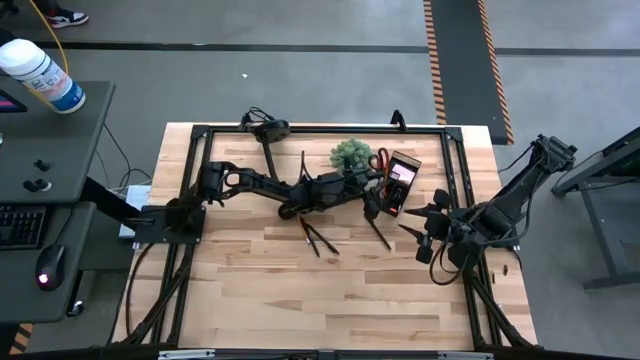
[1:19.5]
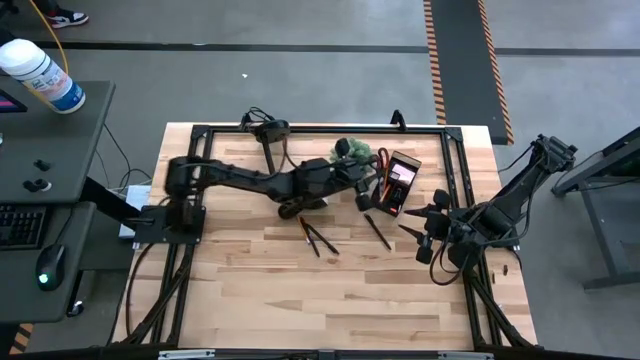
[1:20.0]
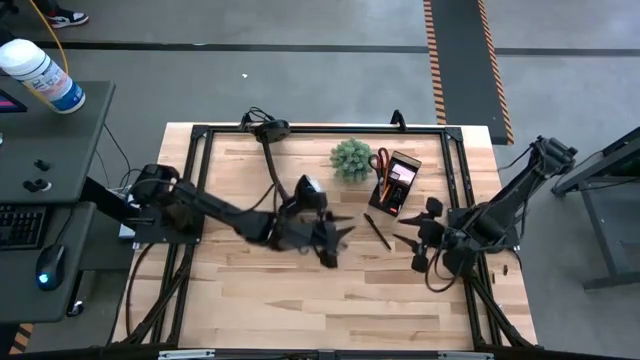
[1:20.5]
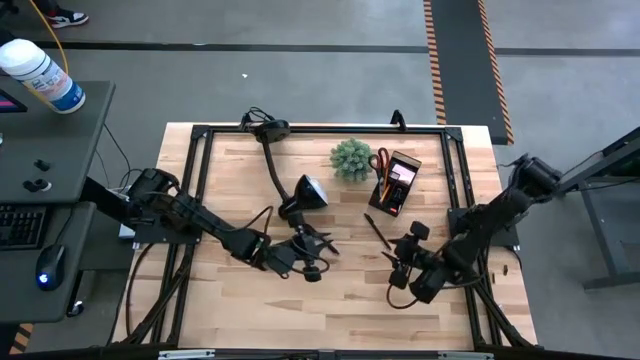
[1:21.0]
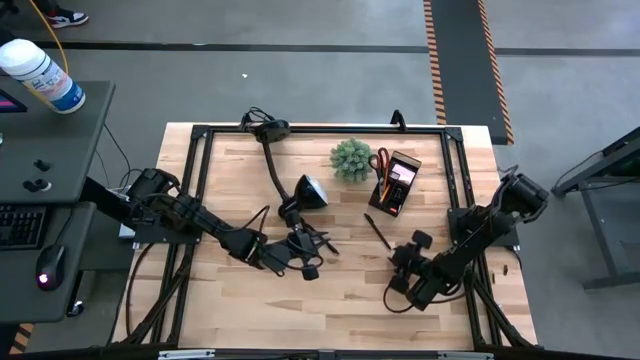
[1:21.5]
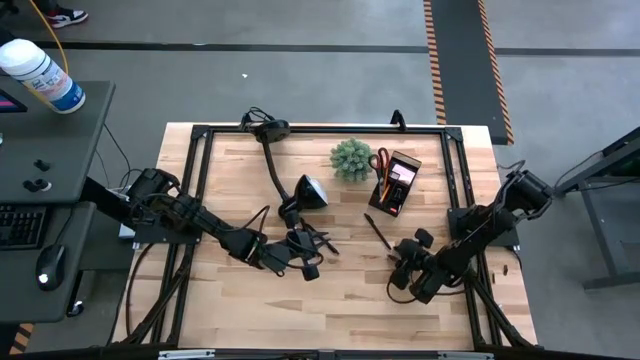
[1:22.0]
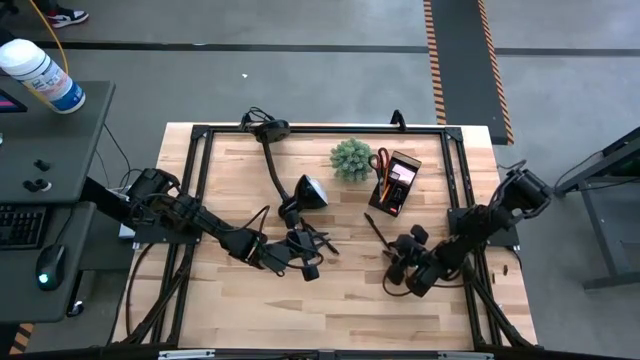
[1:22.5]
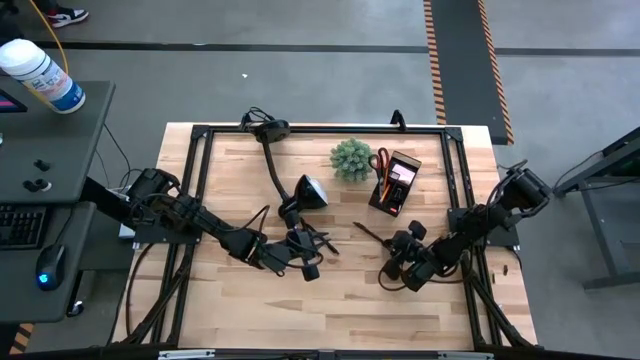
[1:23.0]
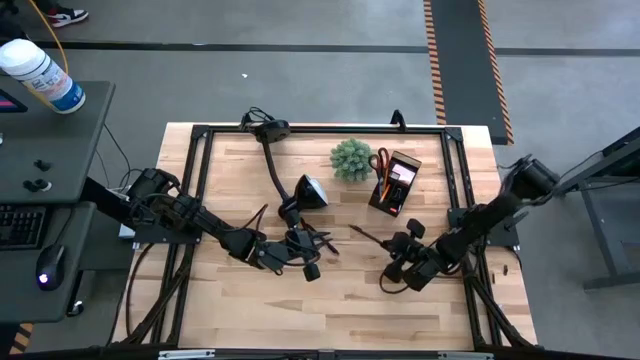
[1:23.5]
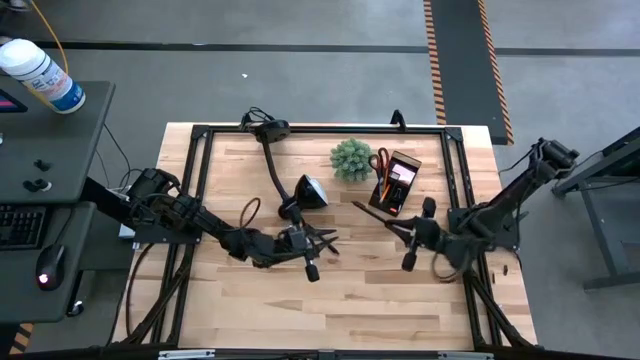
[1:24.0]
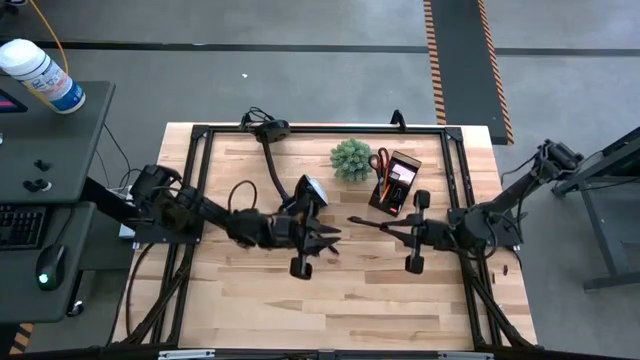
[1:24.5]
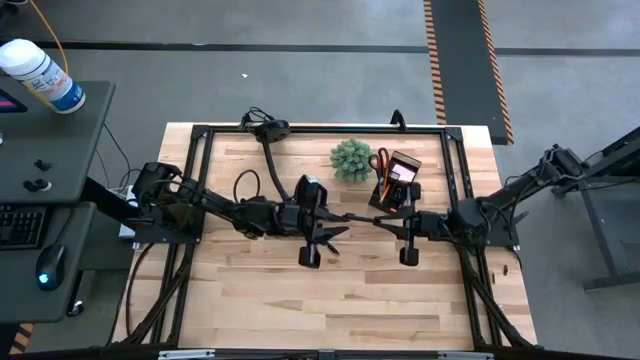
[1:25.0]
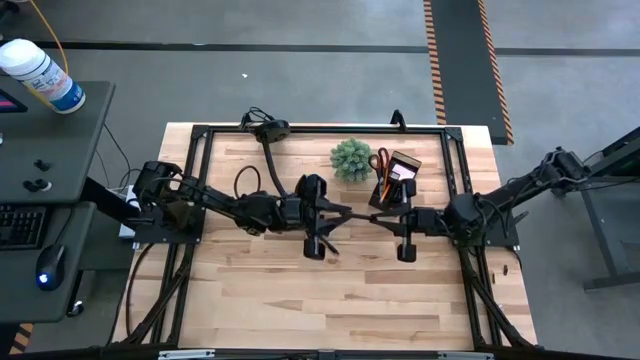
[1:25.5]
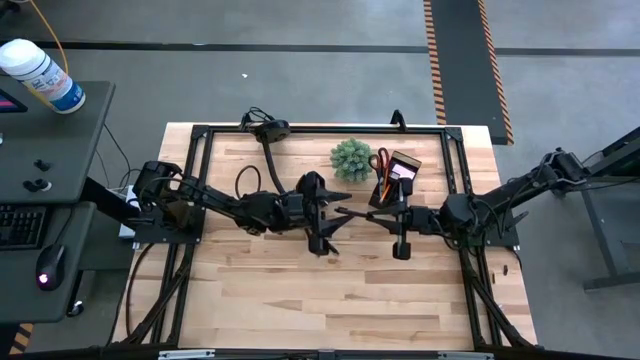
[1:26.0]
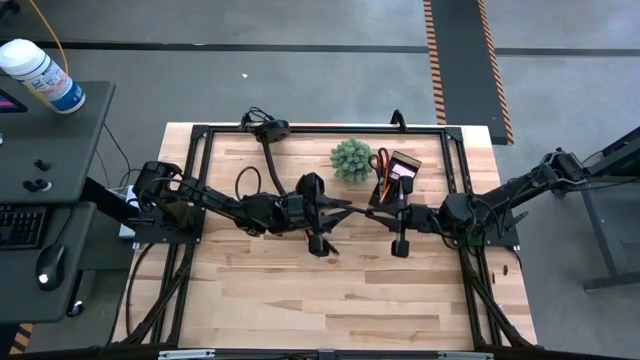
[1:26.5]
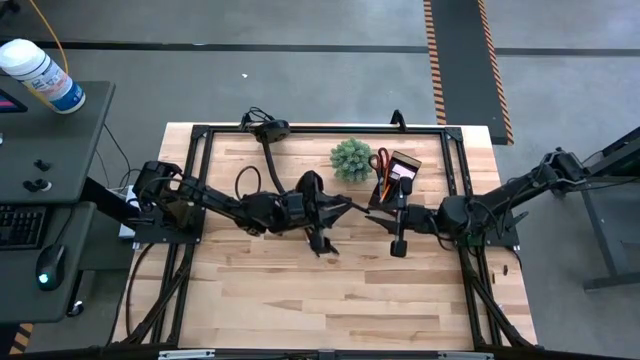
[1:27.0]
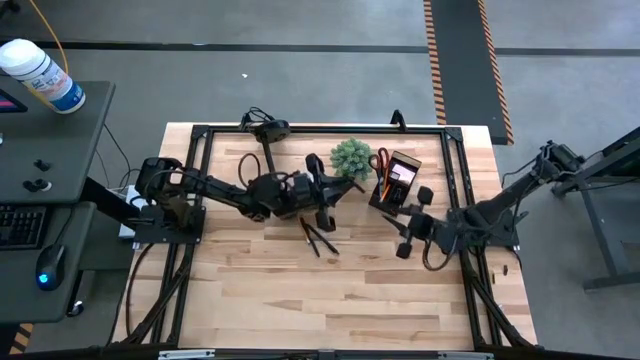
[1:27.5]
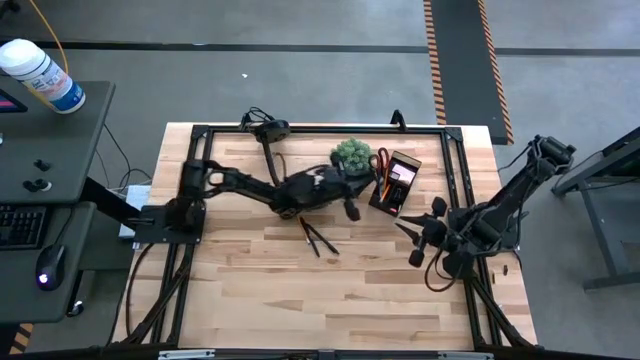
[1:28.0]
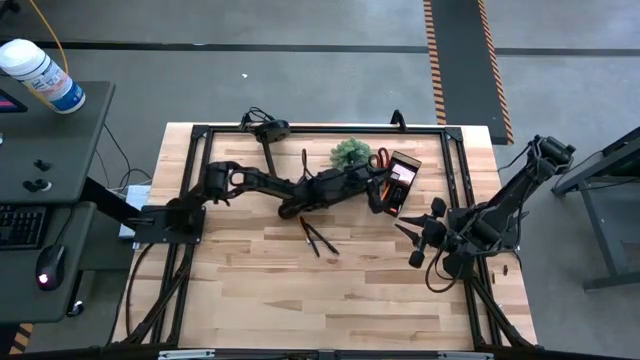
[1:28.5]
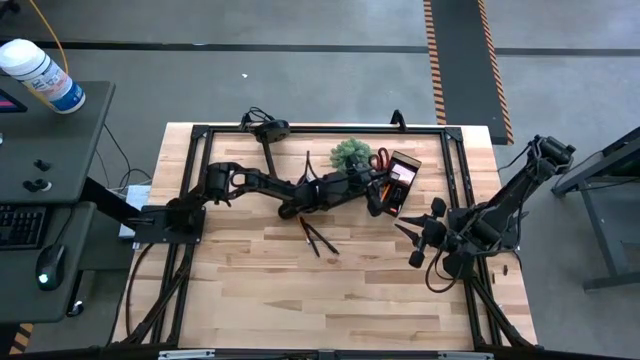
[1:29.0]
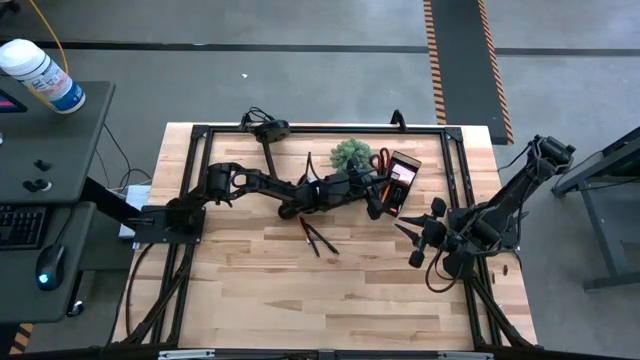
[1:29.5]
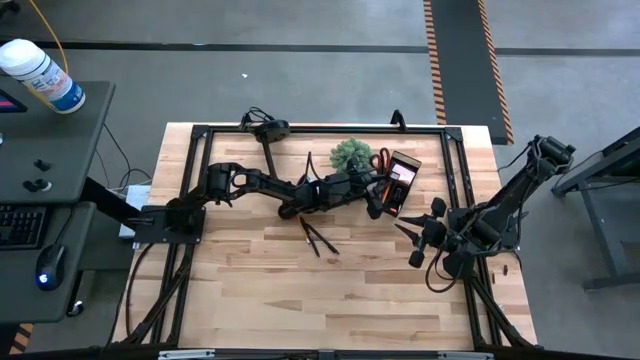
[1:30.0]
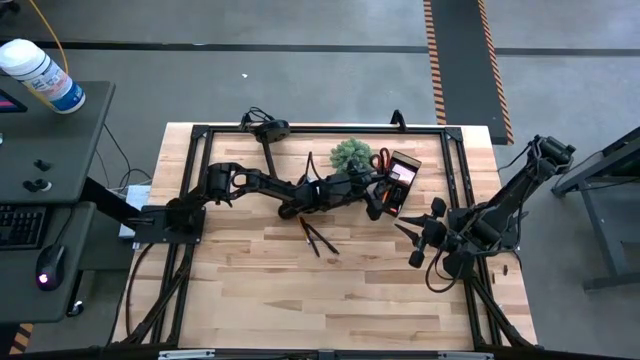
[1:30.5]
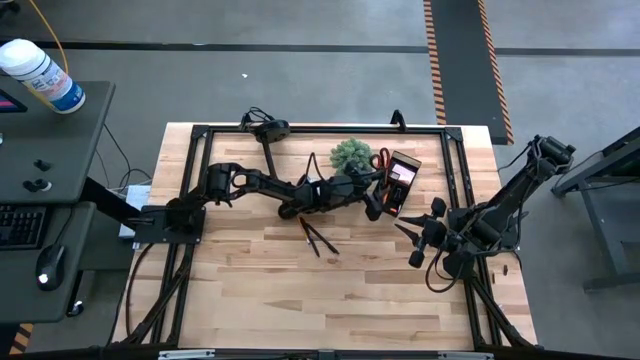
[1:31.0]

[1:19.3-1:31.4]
Task: Pick and place office supplies into organizer
Put the right black pen into the desk organizer

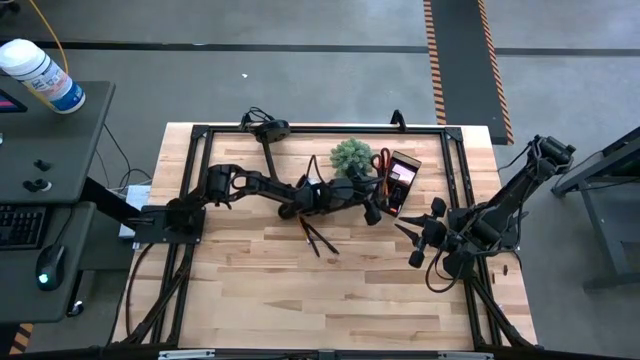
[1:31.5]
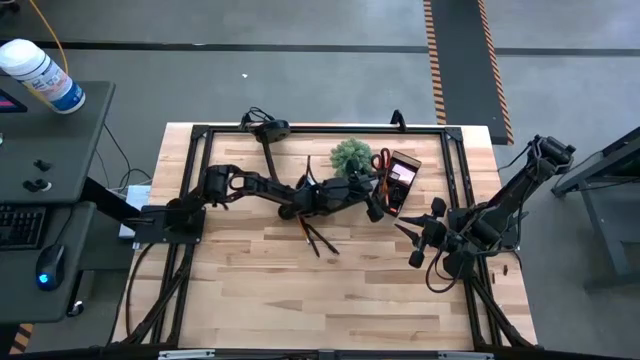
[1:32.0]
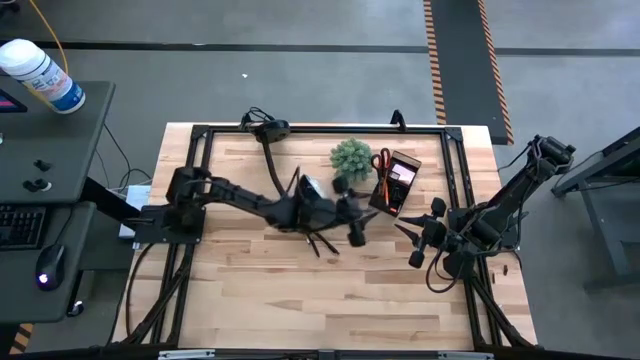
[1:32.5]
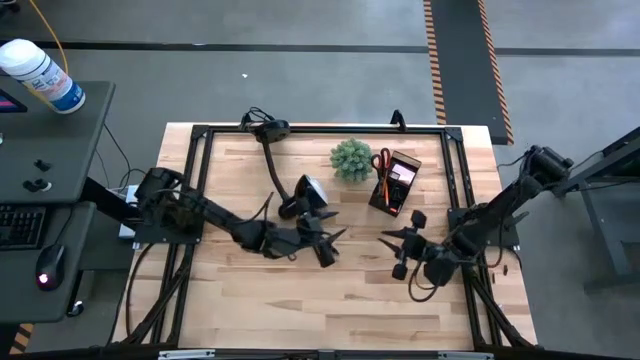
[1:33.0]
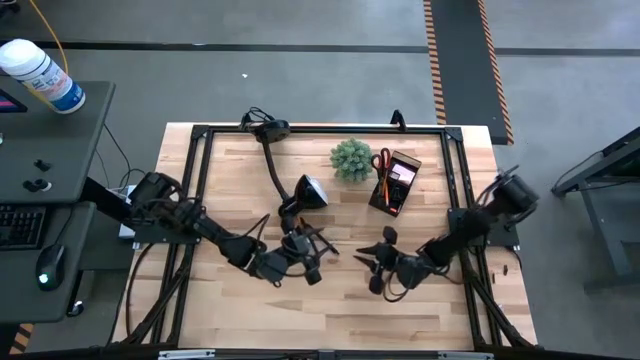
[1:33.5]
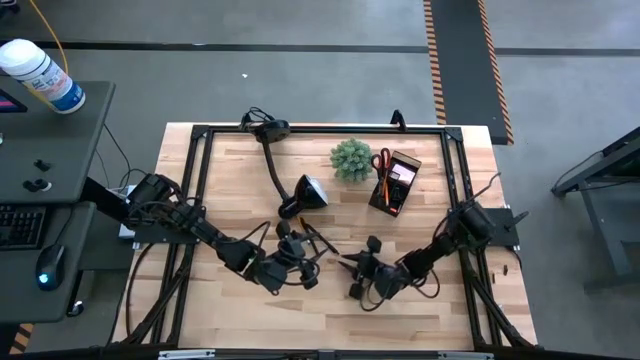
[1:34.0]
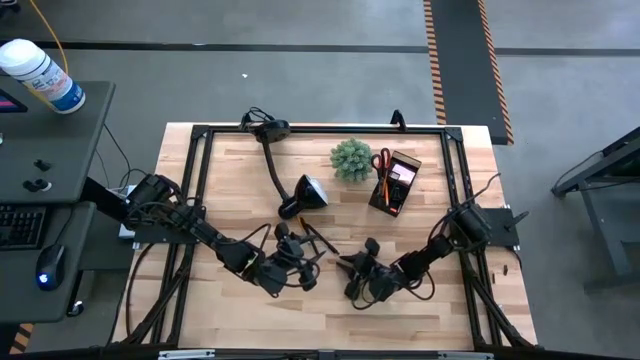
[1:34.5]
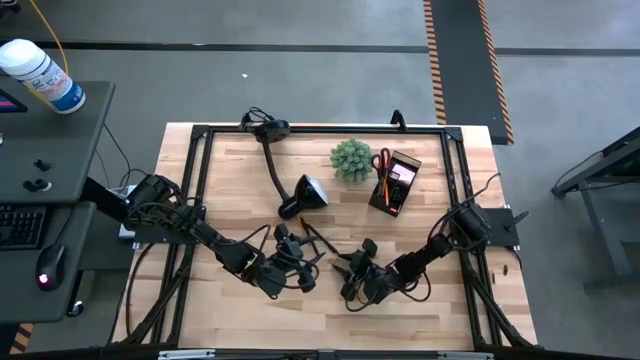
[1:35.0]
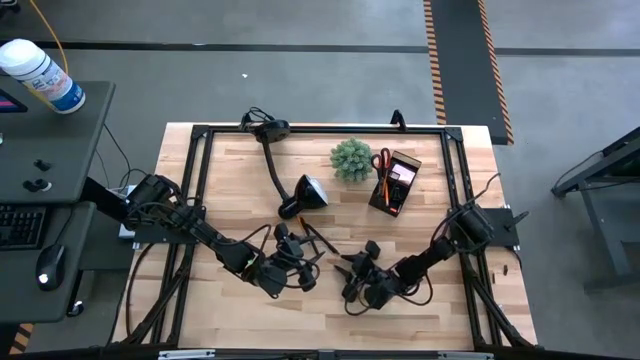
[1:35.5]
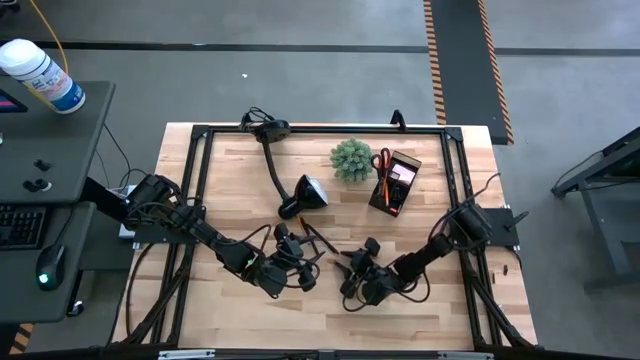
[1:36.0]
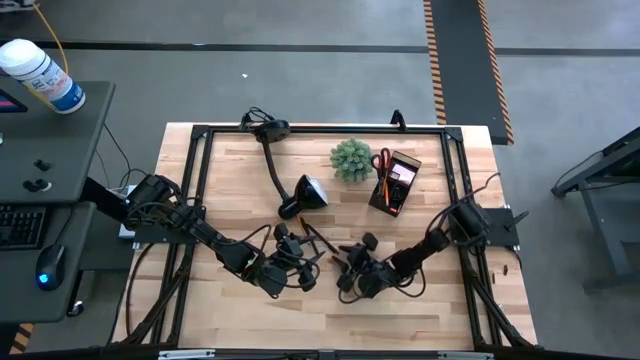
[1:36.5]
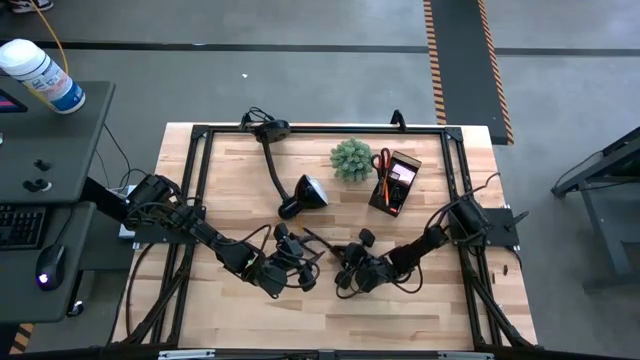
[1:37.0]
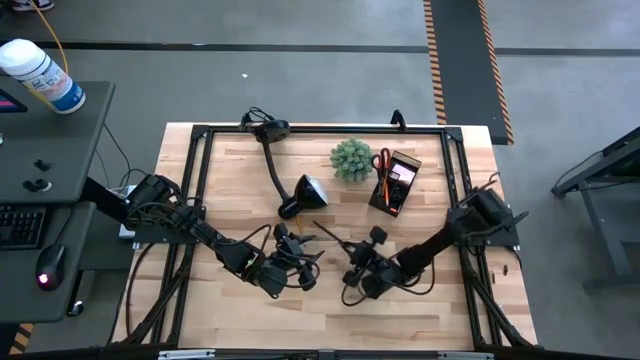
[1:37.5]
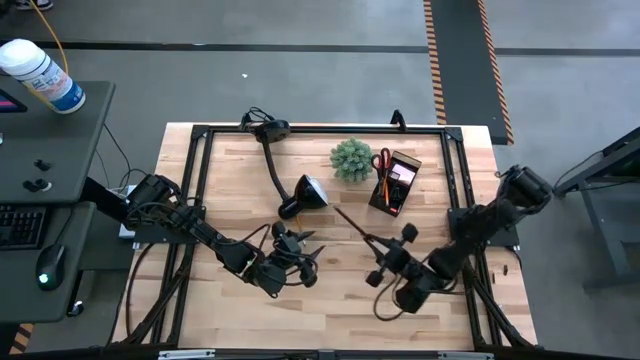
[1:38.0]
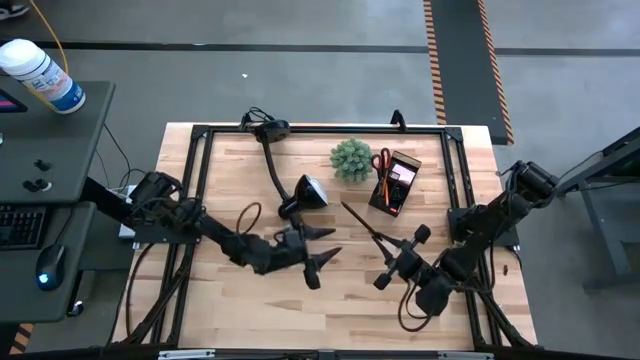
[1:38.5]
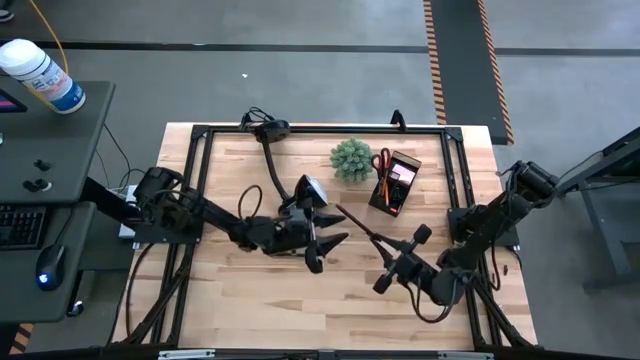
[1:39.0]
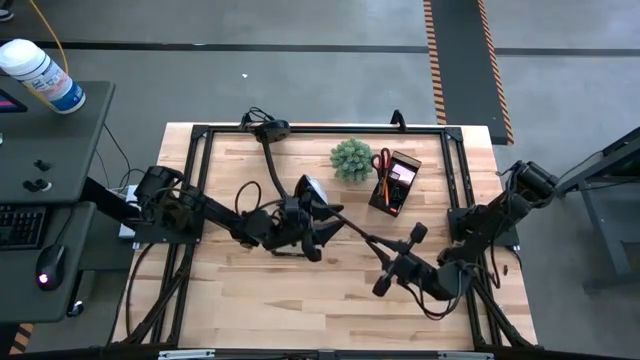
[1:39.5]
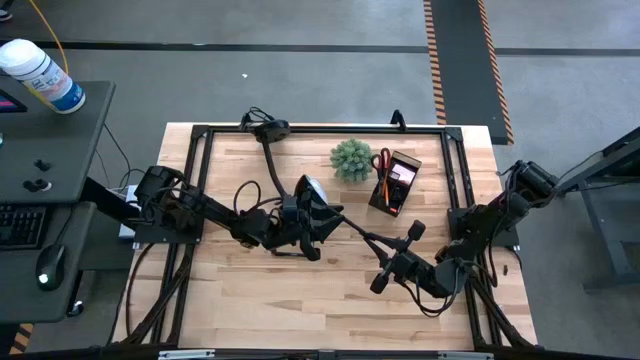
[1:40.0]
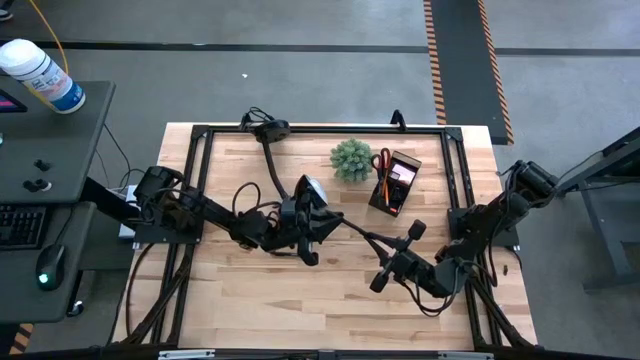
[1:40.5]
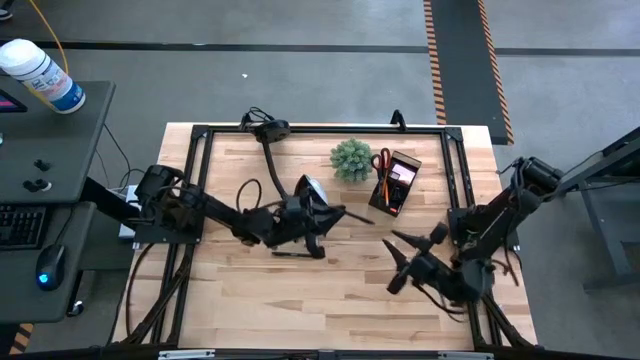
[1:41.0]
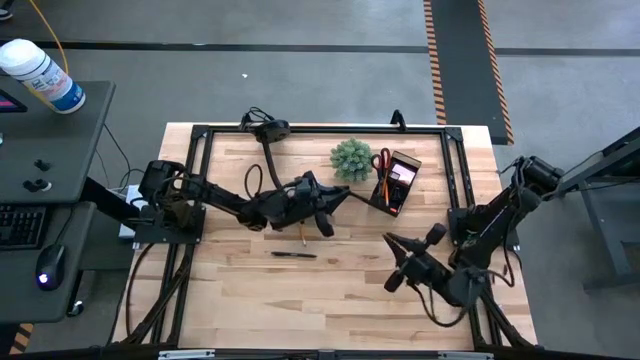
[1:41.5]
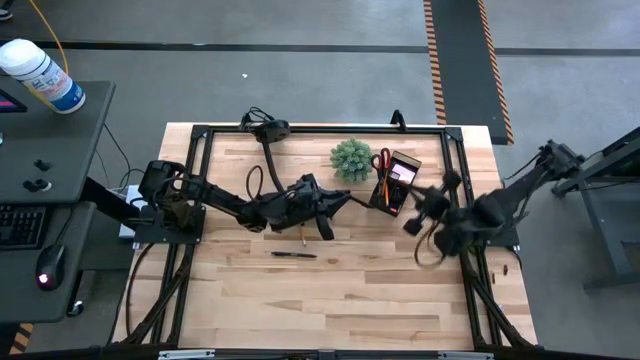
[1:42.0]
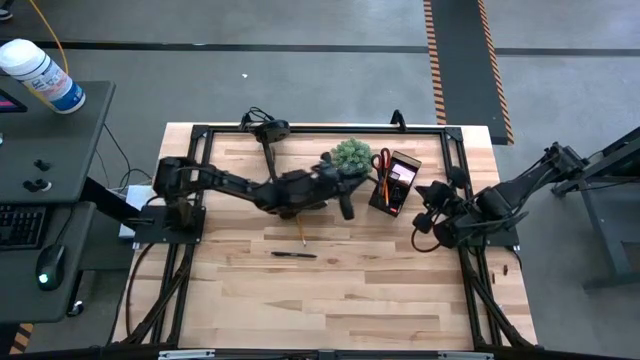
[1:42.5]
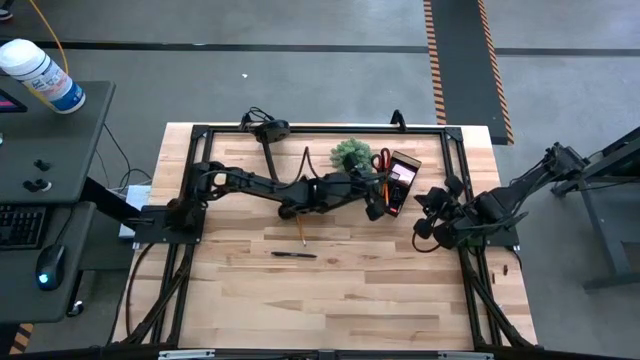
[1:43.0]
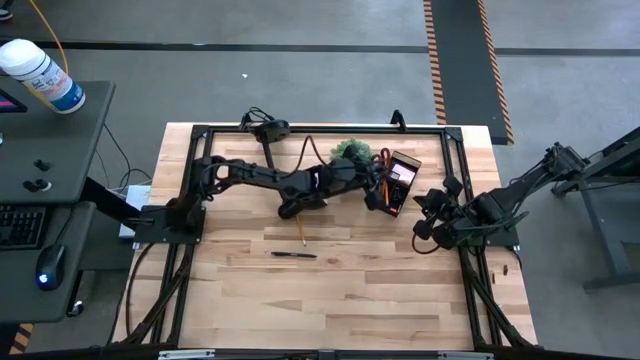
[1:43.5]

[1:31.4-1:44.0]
Put the right black pen into the desk organizer
